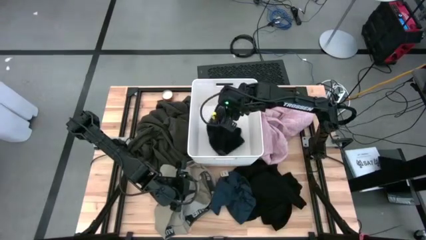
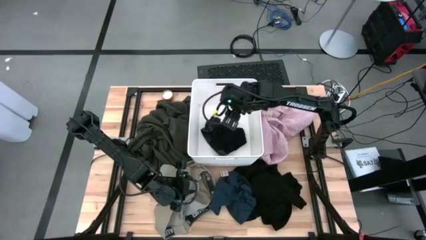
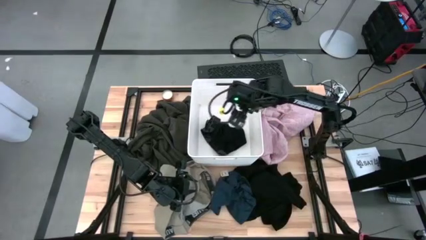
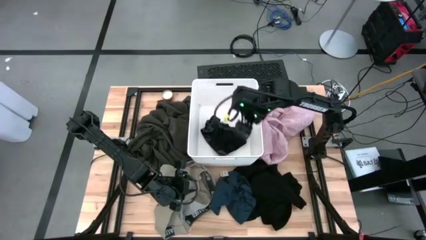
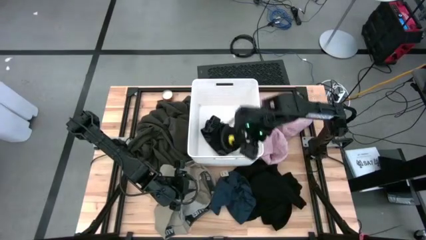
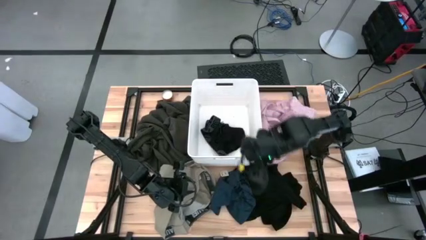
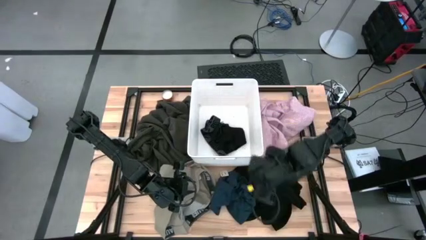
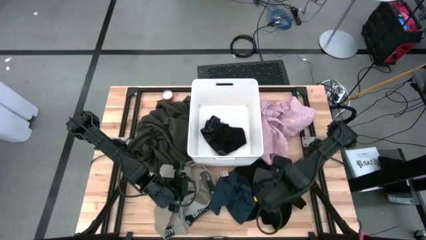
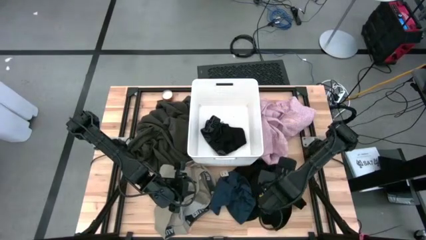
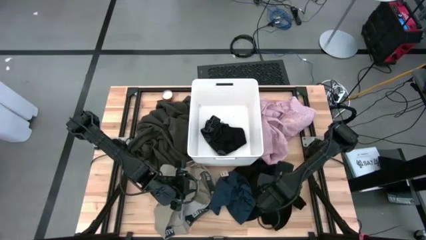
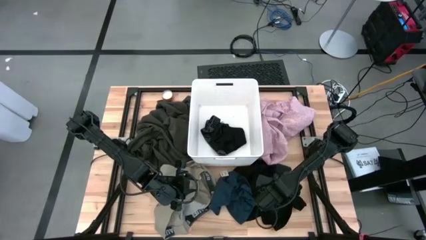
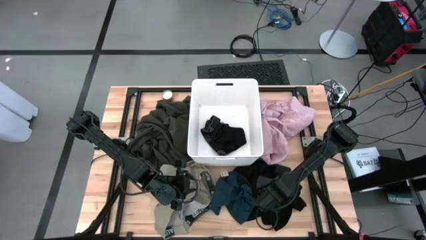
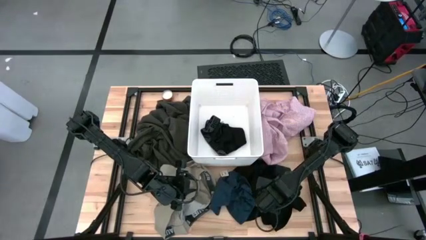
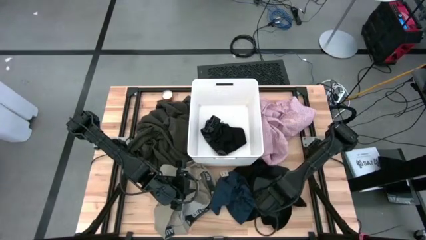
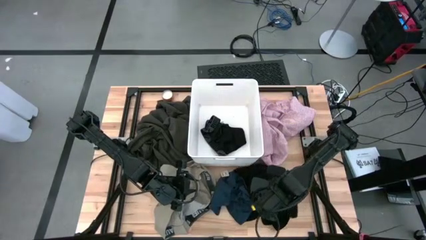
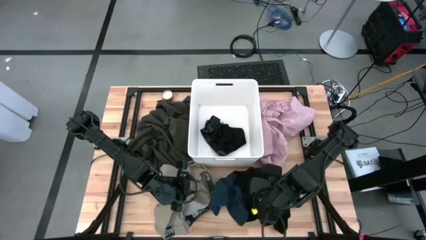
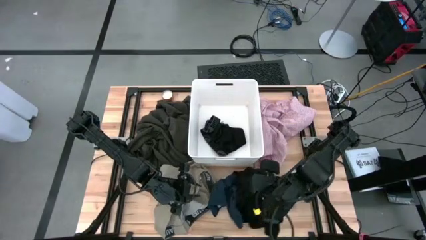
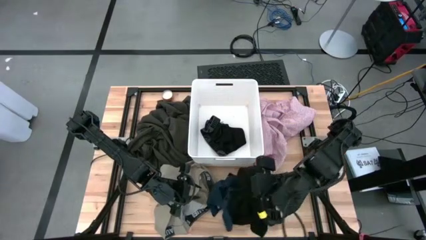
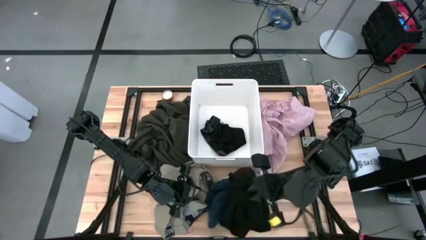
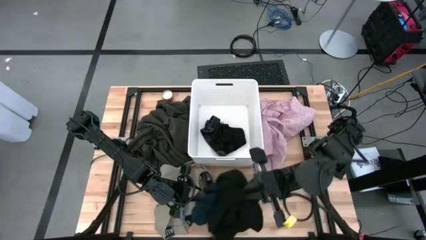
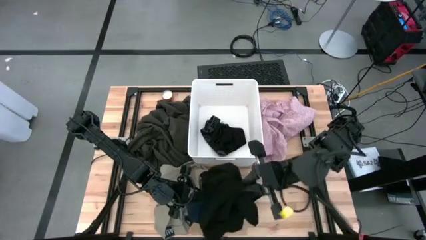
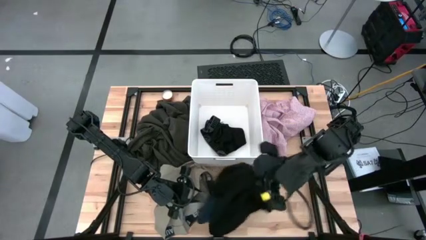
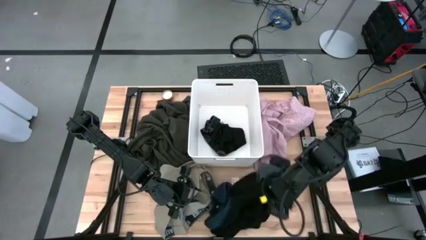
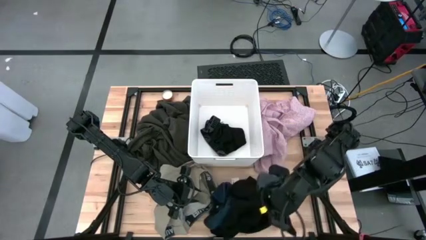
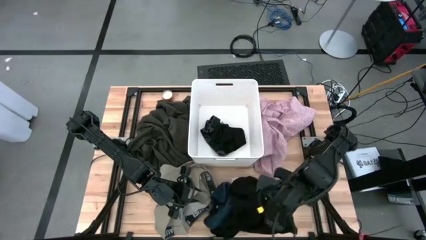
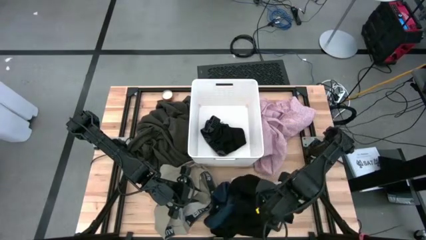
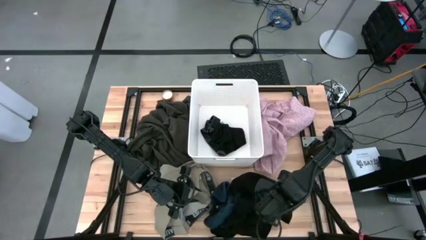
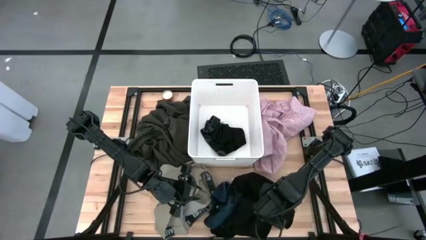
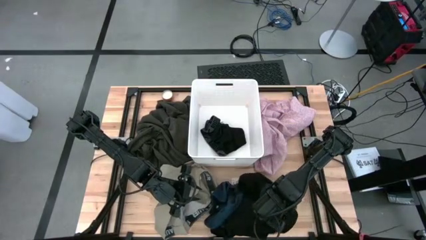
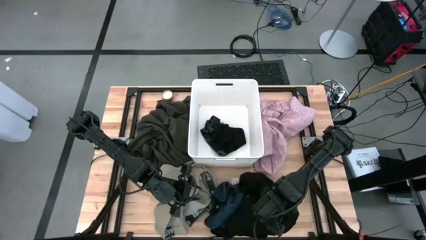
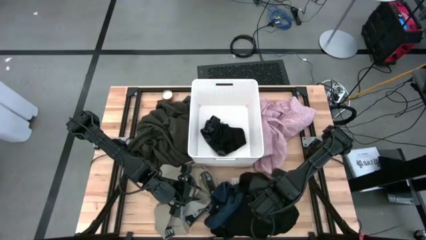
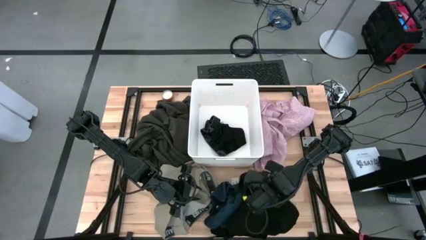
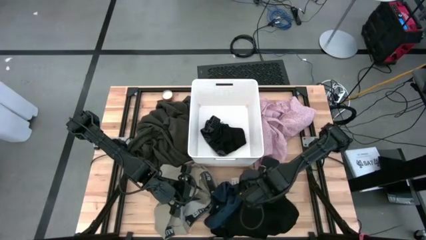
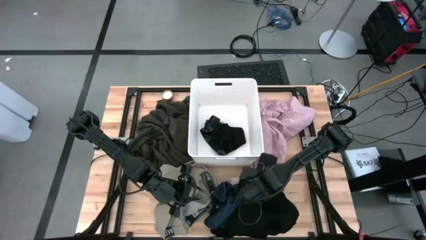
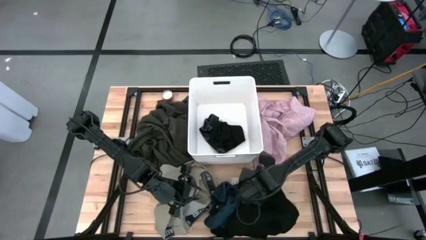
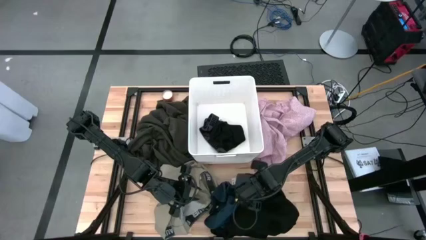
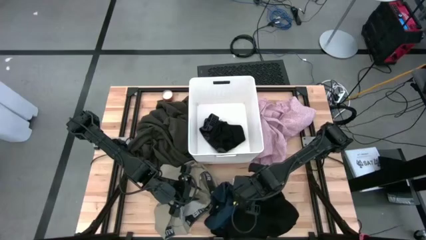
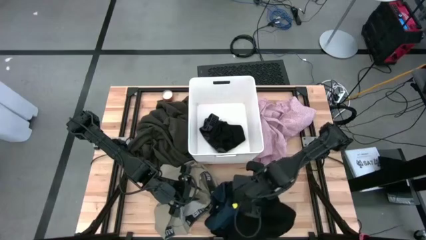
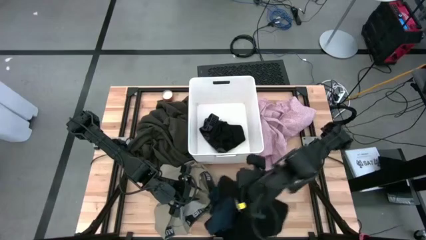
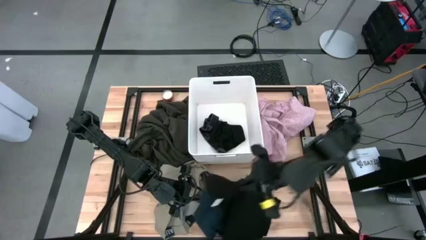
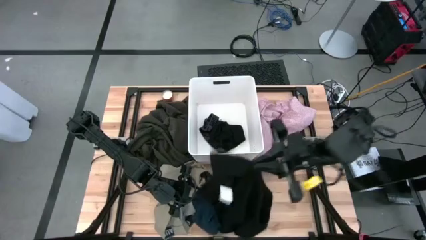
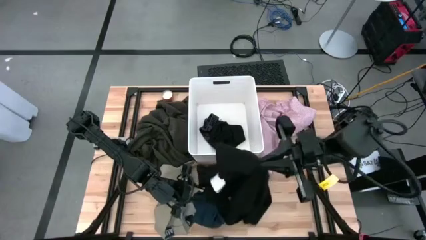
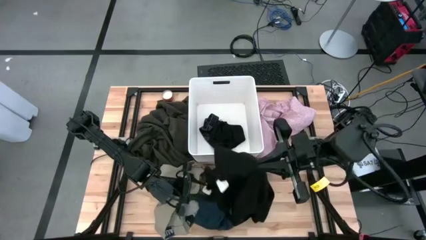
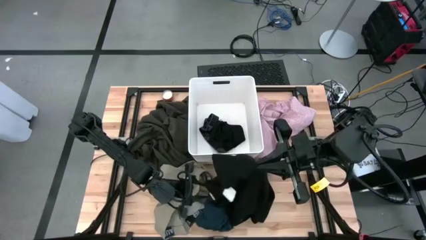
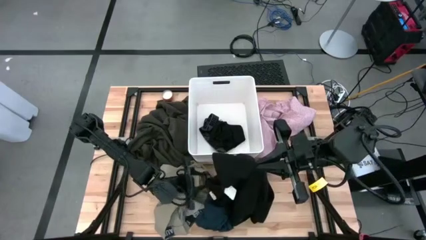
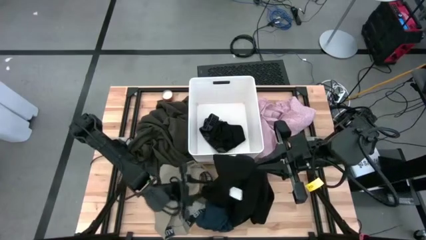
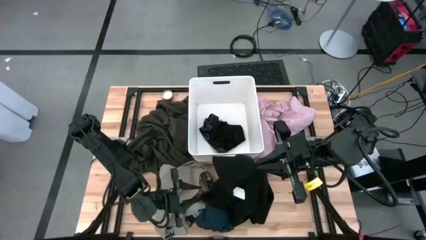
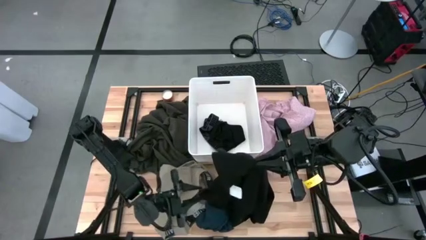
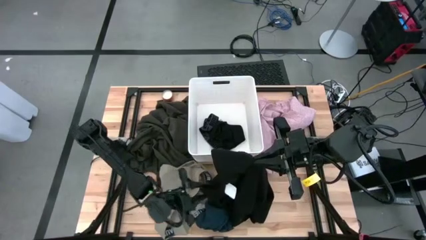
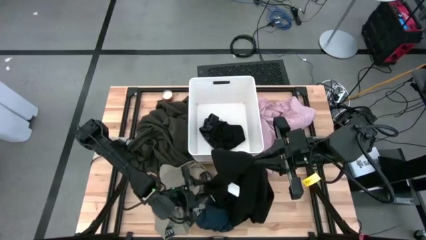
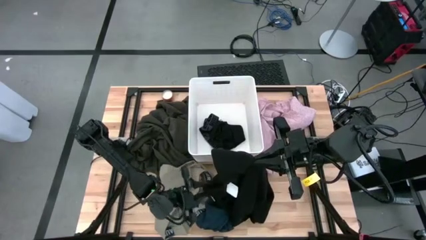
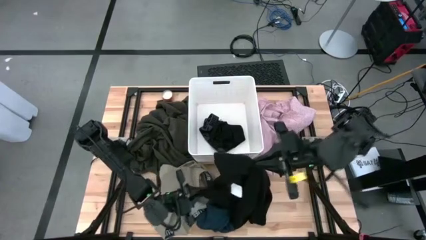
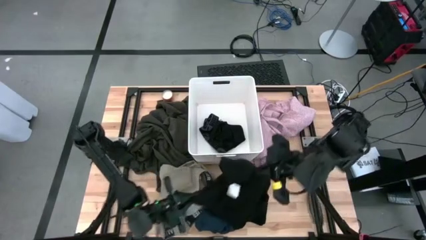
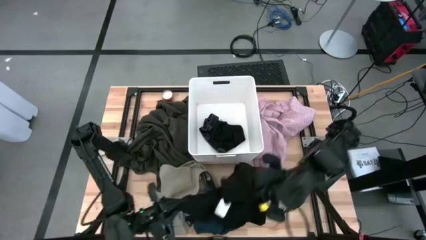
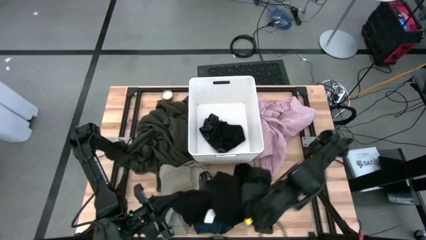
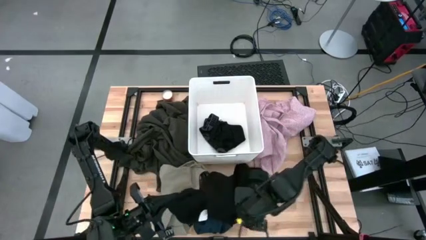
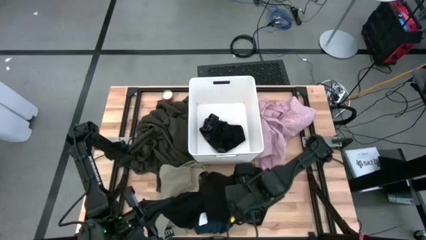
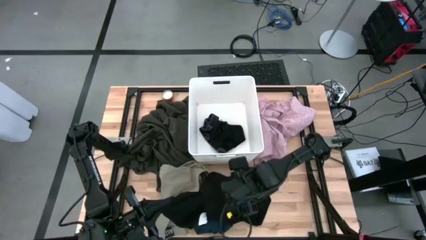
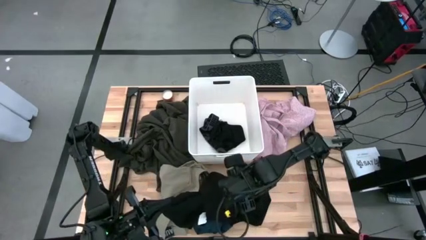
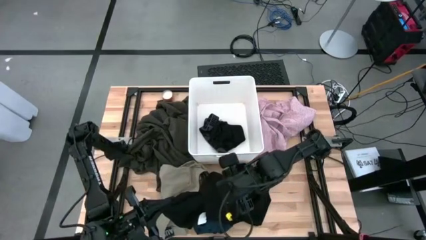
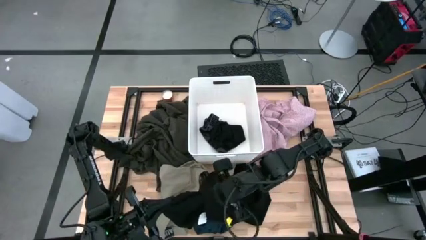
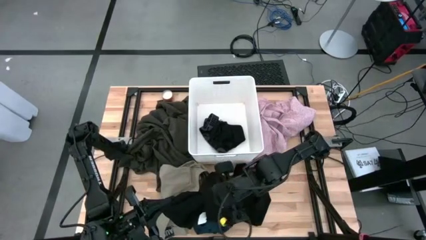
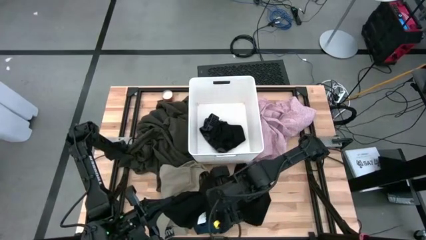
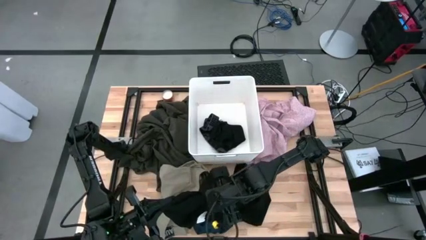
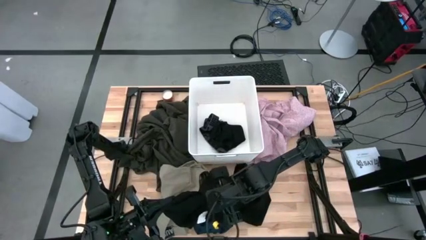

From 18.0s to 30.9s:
Task: Sort clothes
Put the black sweater into the laundry bin

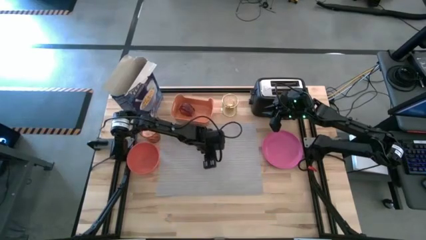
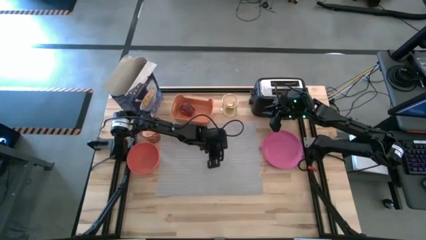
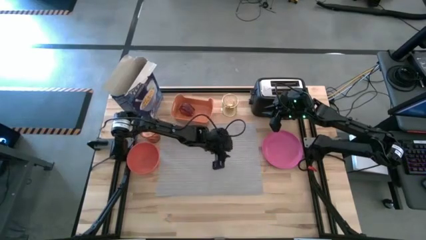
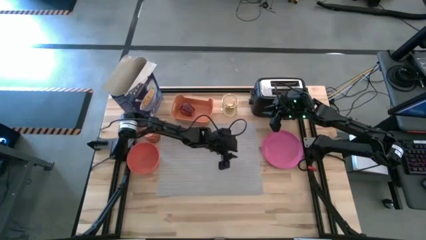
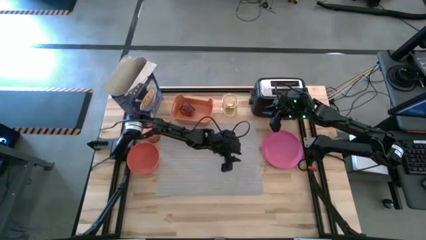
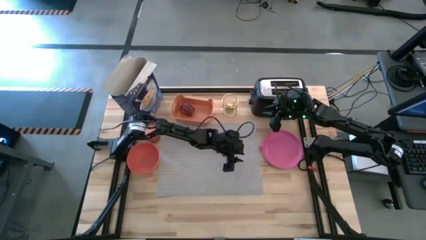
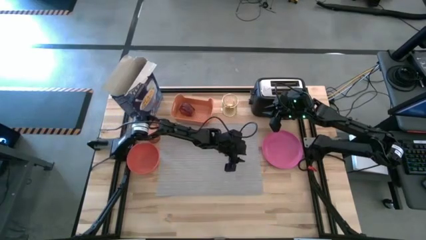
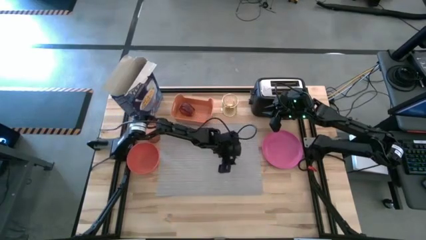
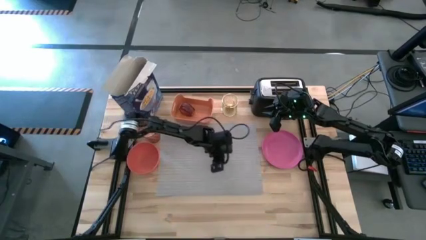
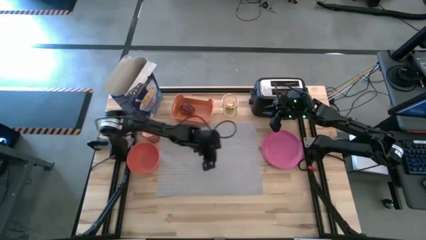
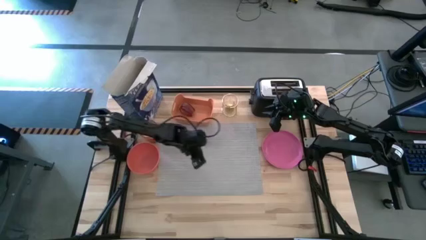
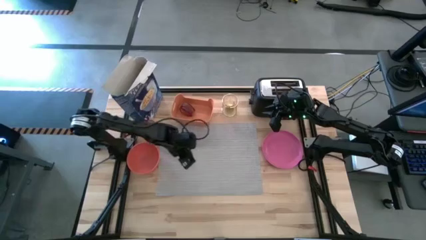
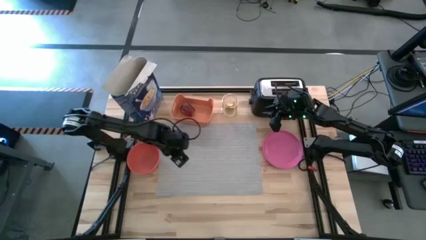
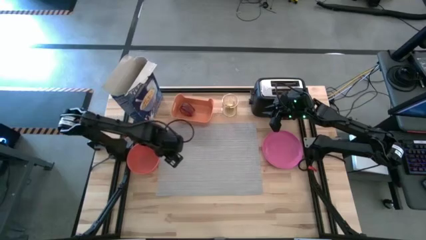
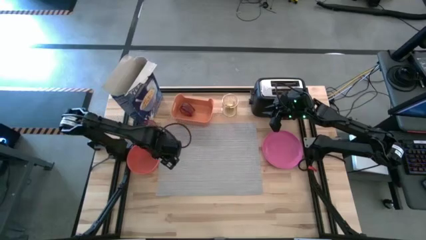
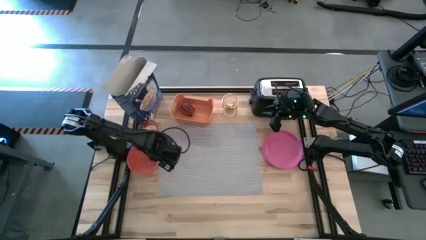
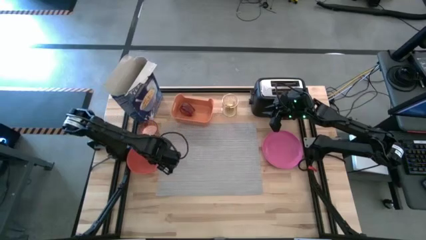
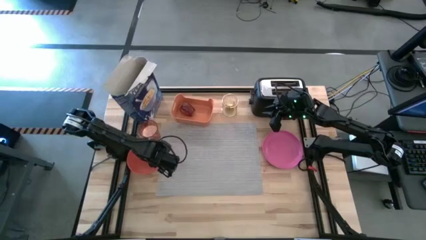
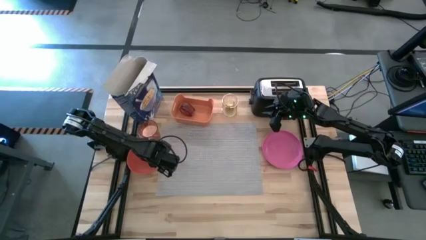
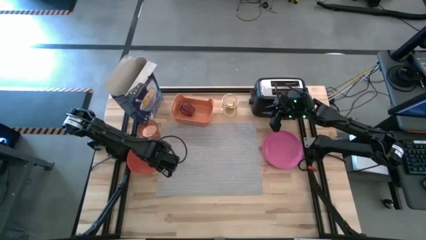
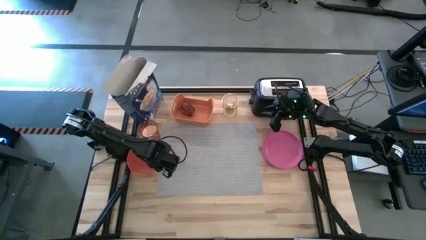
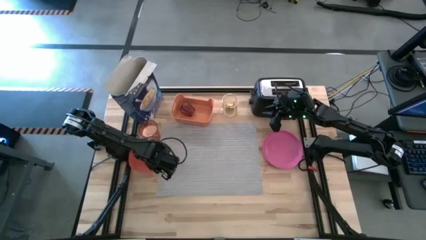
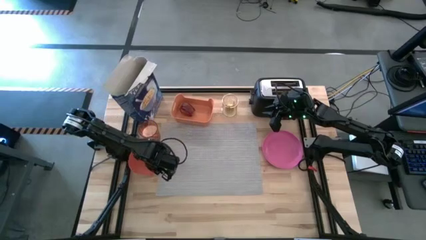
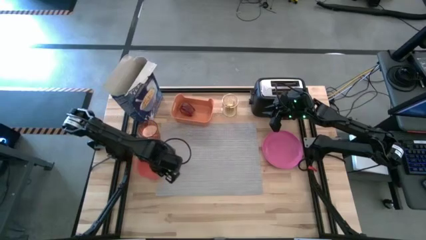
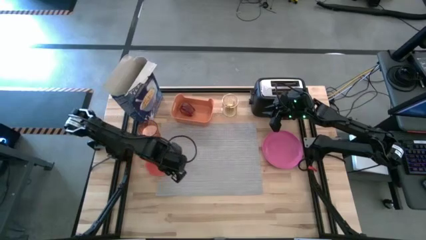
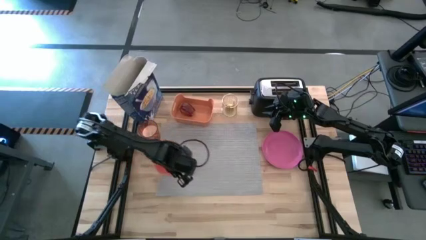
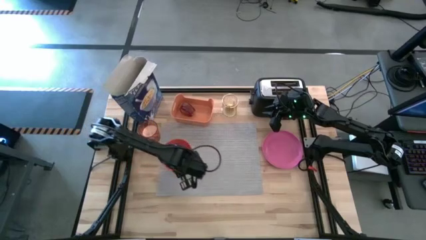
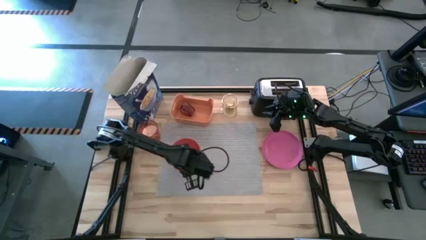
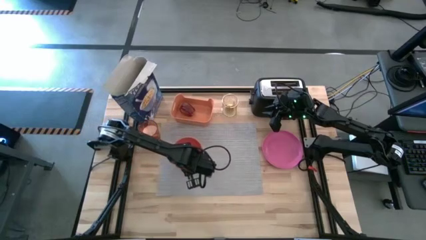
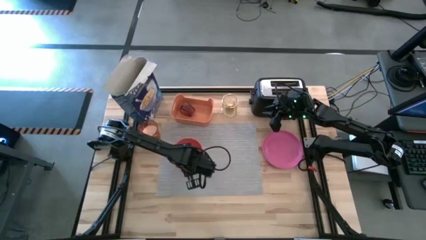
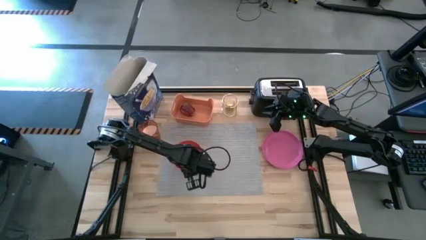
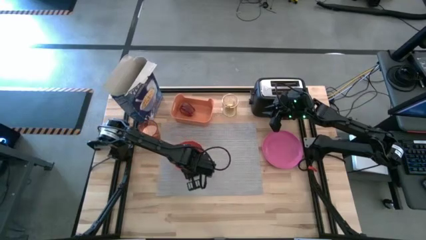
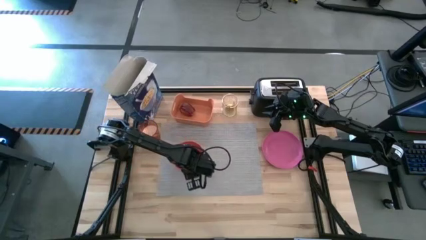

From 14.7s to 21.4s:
Task: Arrange a breakfast setting
Put the orange bowl on the gray tablemat
